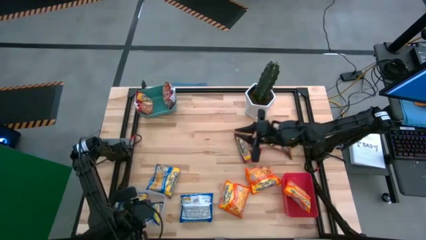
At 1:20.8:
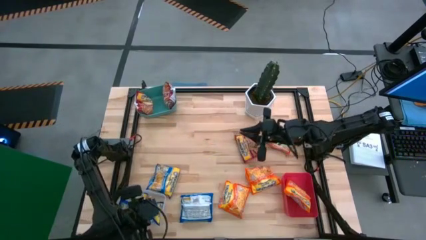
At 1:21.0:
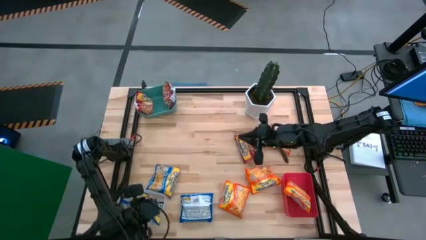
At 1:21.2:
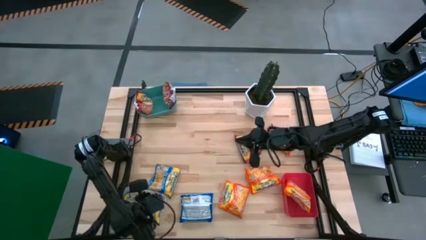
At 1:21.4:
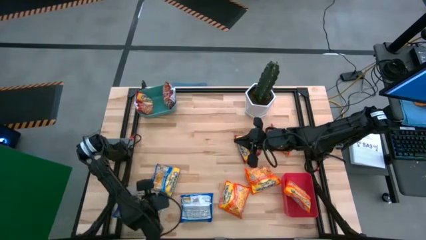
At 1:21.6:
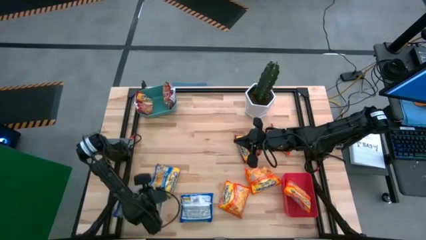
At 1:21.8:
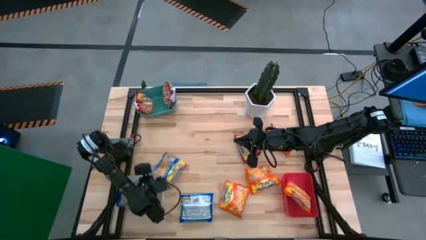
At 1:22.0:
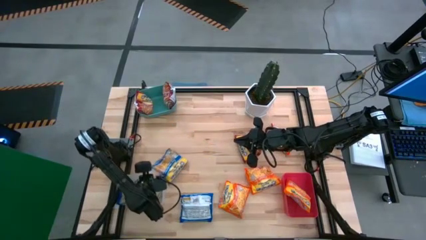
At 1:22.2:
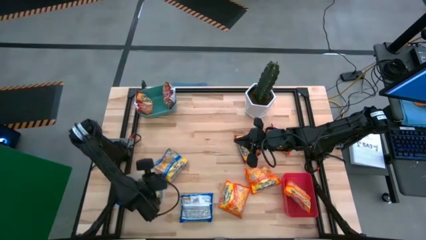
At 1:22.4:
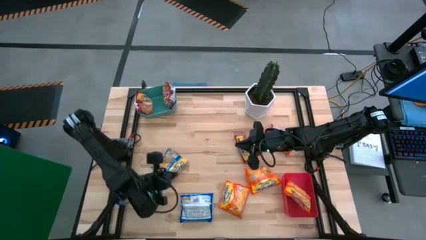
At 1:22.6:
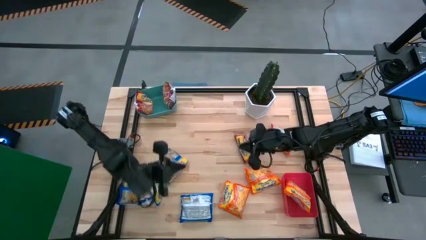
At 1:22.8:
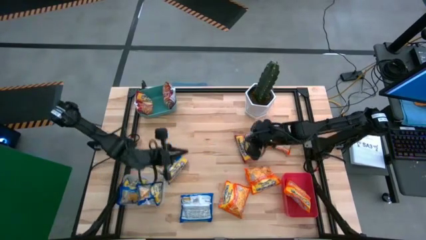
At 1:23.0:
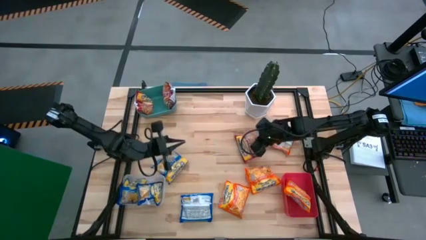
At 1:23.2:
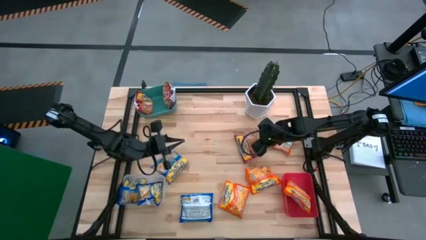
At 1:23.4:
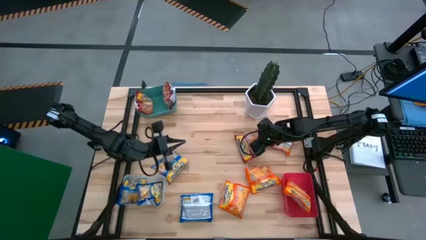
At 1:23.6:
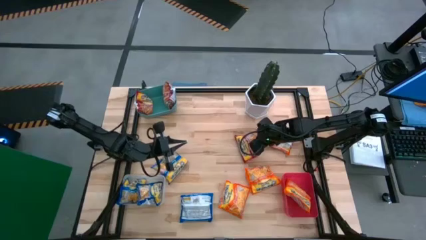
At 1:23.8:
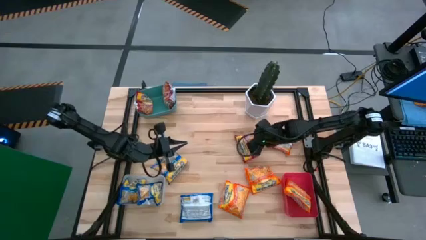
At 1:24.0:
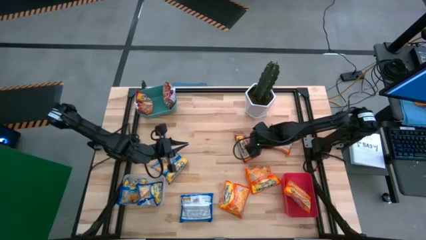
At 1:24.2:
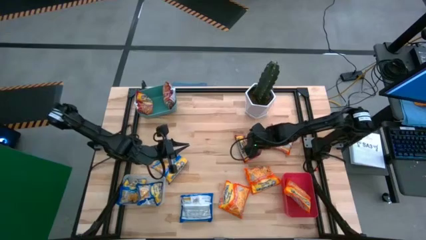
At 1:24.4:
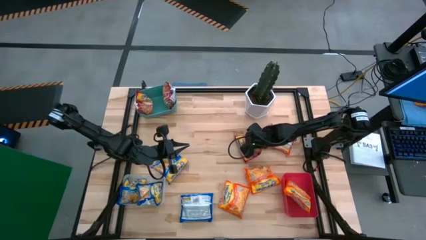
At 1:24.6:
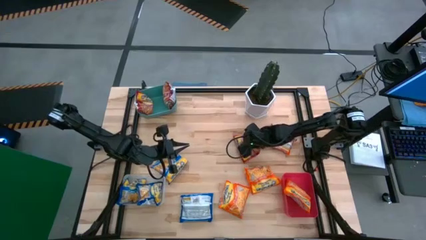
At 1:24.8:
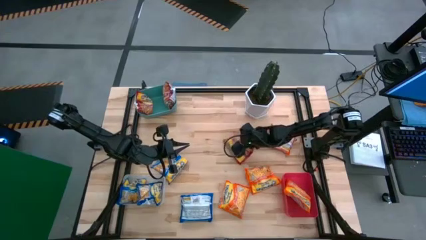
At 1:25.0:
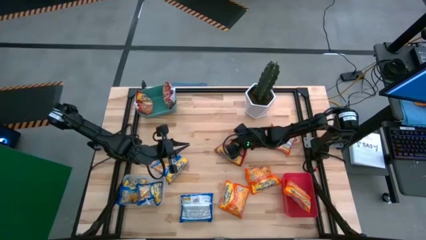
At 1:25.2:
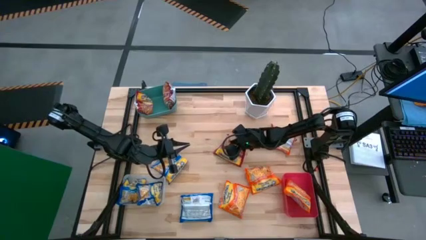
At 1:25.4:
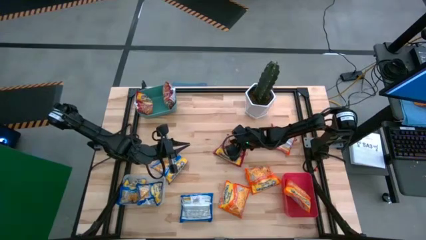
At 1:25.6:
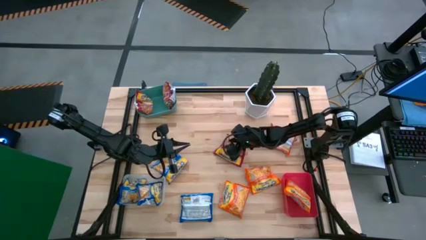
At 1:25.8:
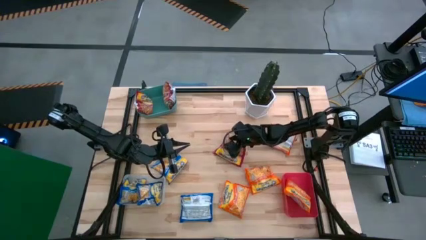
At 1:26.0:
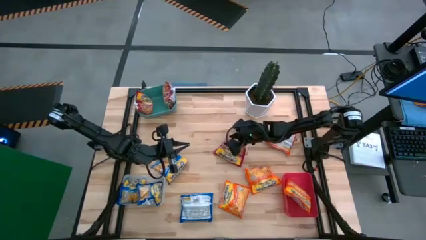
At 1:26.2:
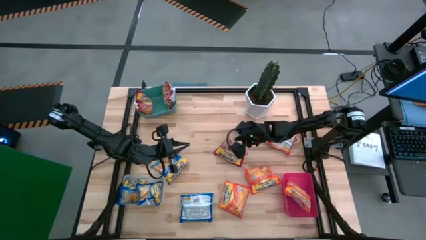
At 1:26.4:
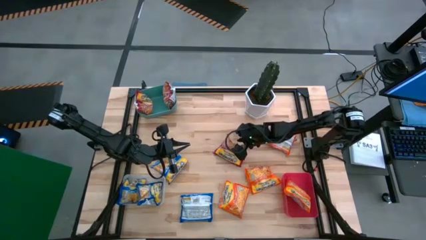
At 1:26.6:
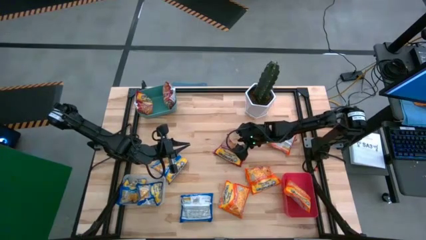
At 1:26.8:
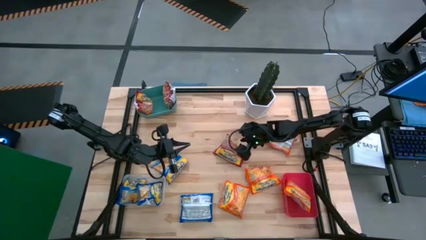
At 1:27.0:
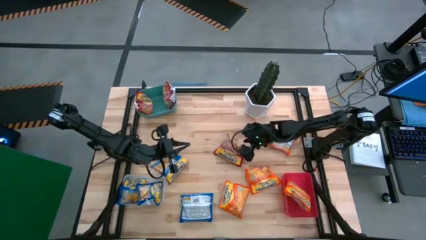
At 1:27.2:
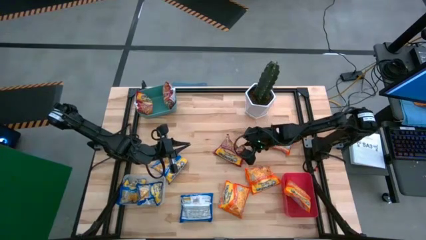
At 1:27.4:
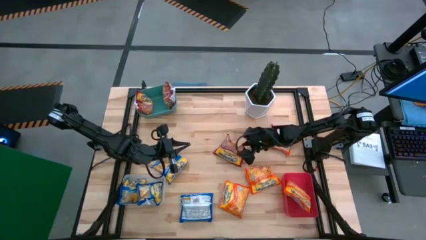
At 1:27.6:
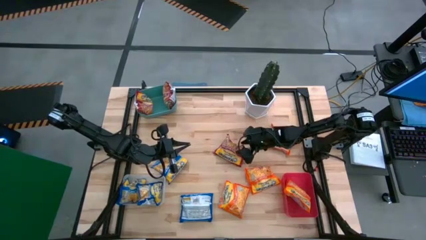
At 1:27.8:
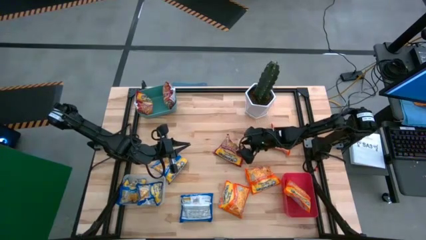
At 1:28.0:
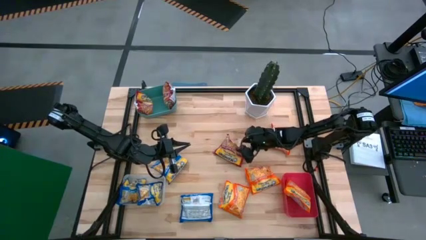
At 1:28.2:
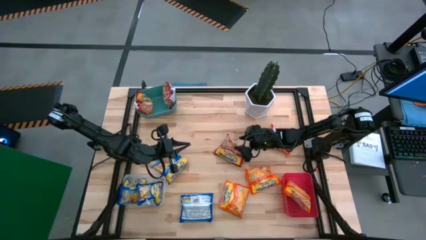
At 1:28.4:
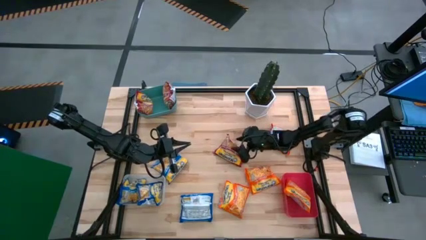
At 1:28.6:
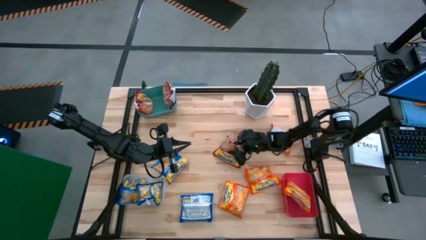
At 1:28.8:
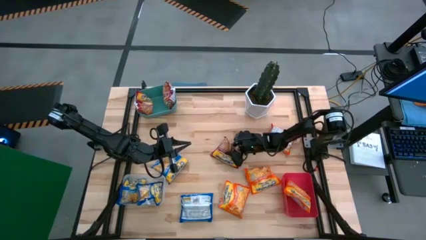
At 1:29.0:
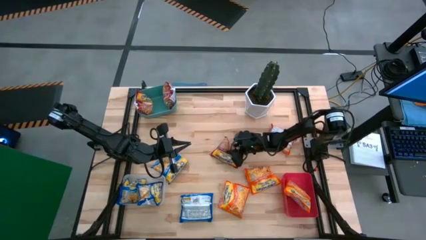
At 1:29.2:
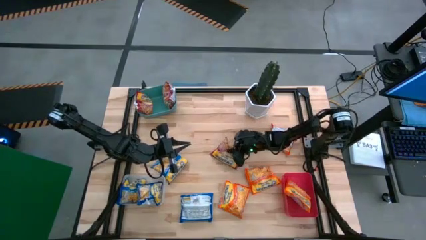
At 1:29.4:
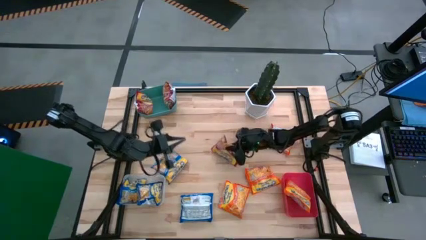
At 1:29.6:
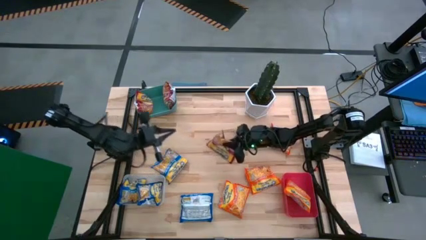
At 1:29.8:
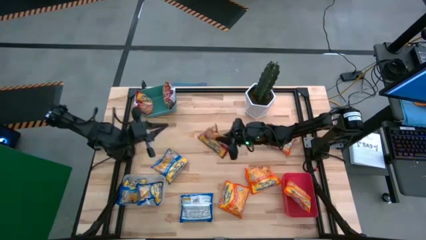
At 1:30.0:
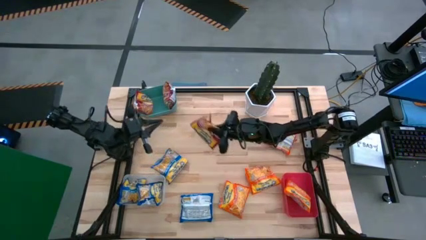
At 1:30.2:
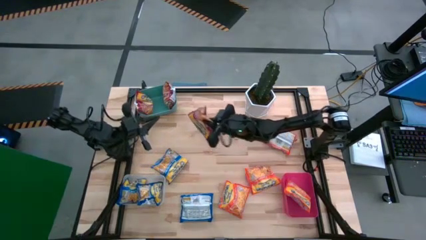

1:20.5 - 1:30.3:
Task: Sort Maruchan noodles
Put the red noodle into the green bin

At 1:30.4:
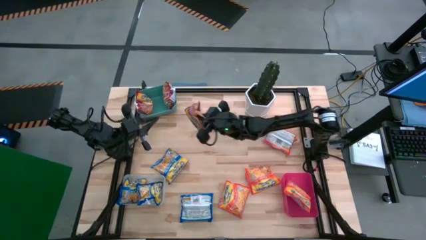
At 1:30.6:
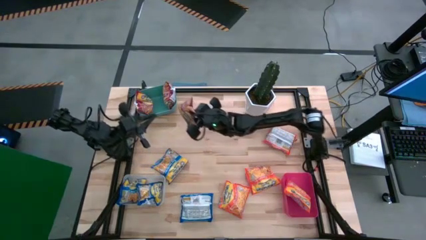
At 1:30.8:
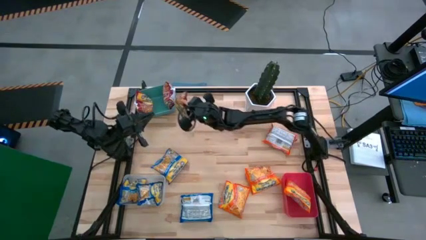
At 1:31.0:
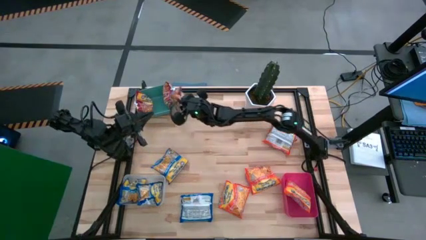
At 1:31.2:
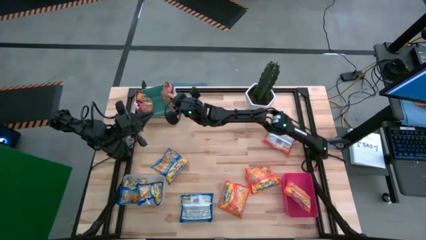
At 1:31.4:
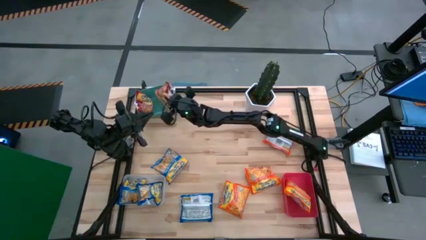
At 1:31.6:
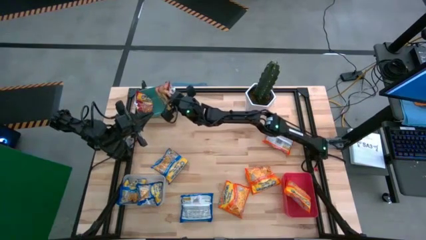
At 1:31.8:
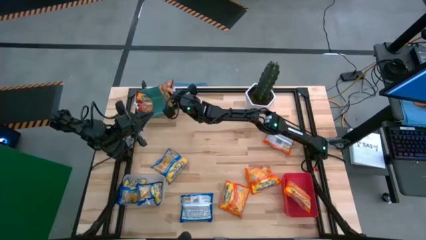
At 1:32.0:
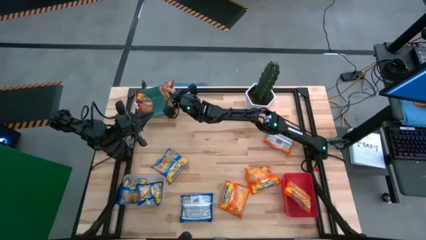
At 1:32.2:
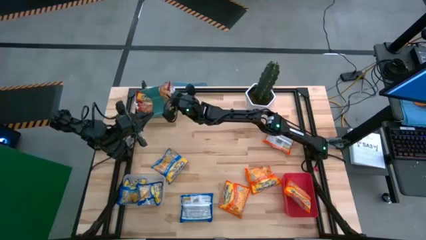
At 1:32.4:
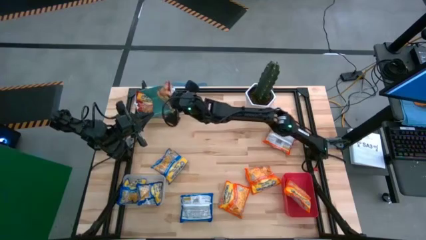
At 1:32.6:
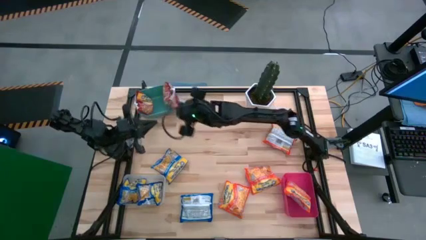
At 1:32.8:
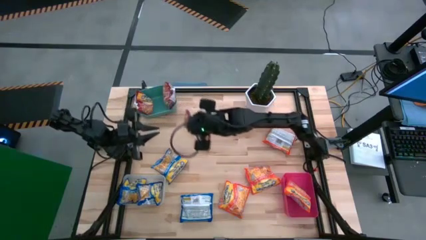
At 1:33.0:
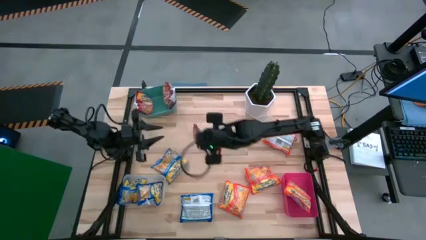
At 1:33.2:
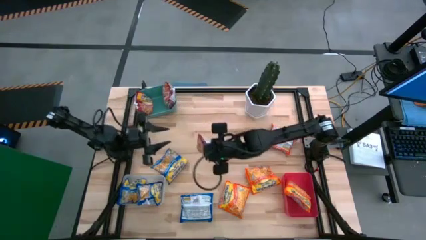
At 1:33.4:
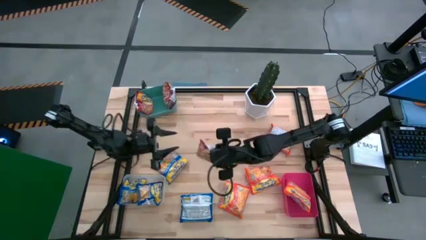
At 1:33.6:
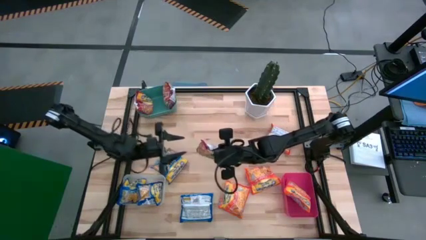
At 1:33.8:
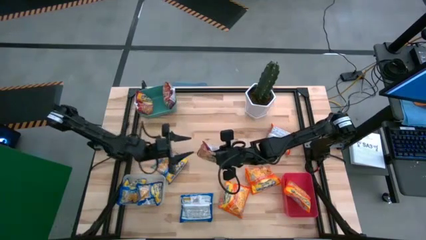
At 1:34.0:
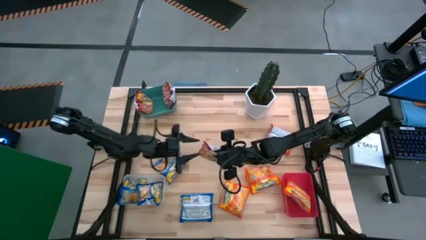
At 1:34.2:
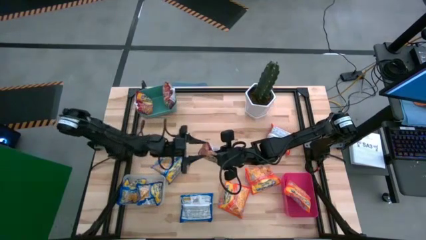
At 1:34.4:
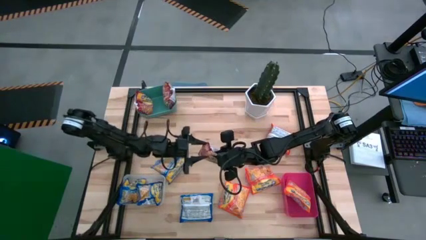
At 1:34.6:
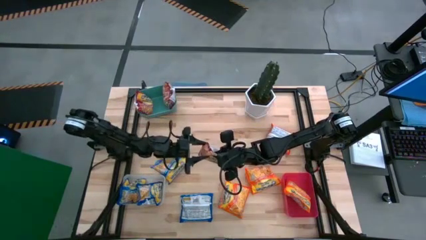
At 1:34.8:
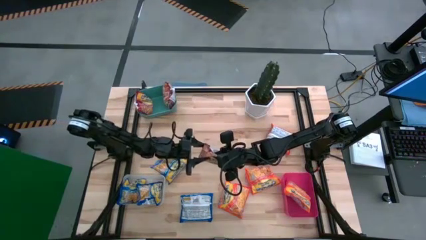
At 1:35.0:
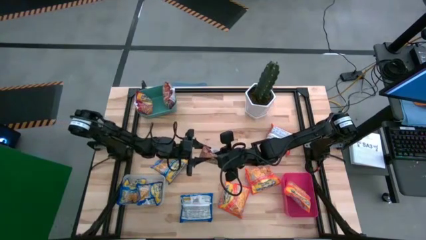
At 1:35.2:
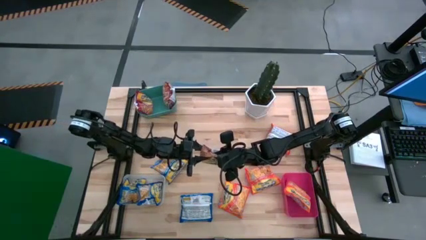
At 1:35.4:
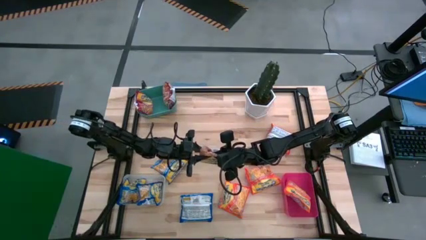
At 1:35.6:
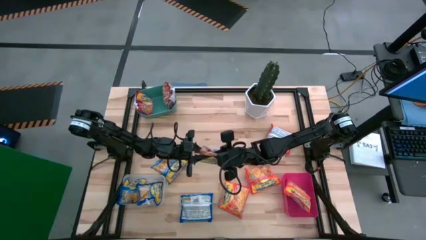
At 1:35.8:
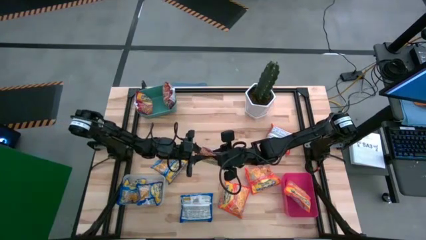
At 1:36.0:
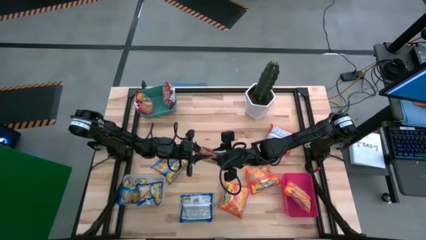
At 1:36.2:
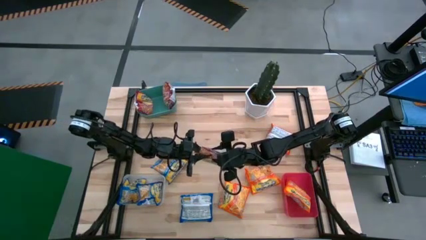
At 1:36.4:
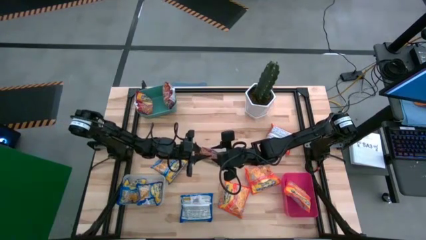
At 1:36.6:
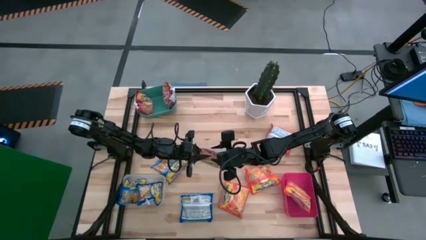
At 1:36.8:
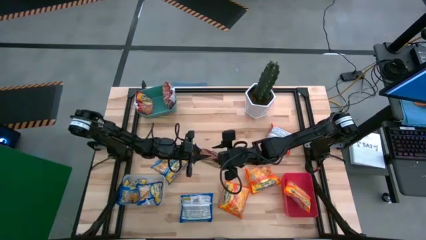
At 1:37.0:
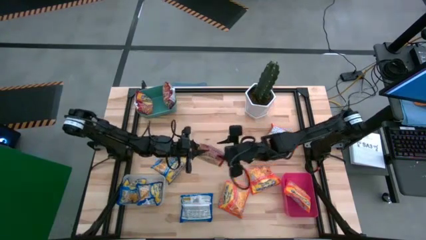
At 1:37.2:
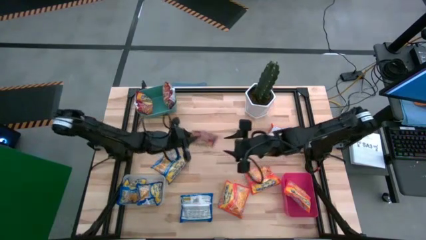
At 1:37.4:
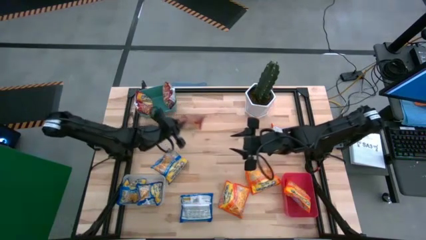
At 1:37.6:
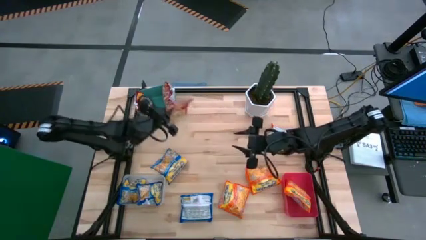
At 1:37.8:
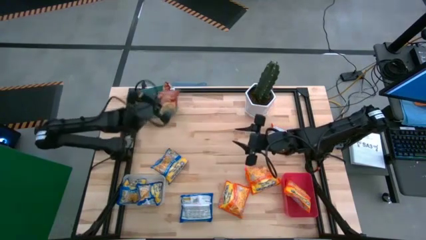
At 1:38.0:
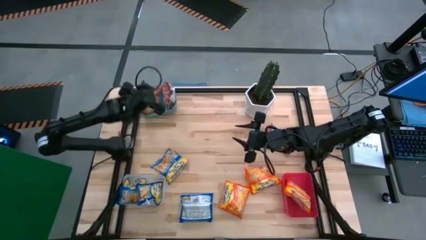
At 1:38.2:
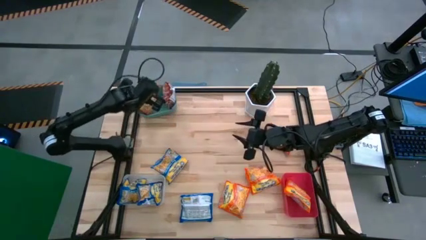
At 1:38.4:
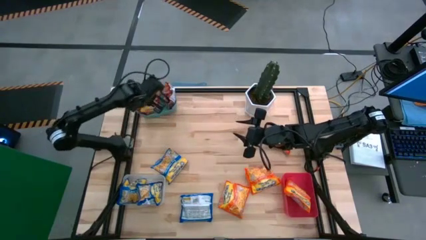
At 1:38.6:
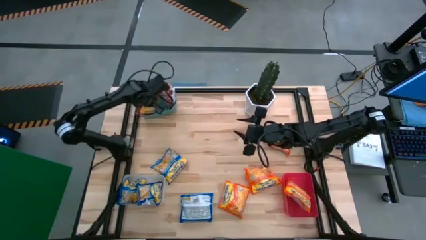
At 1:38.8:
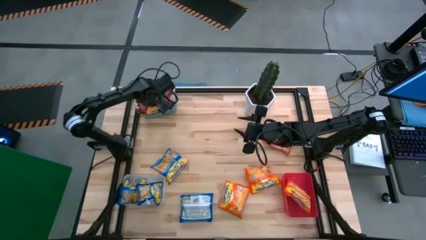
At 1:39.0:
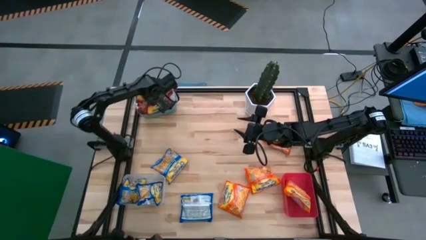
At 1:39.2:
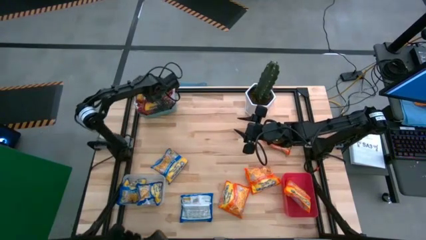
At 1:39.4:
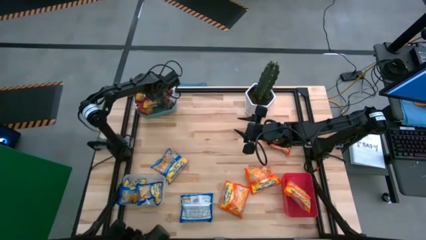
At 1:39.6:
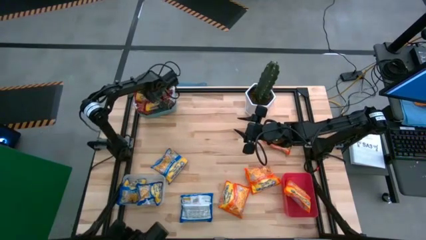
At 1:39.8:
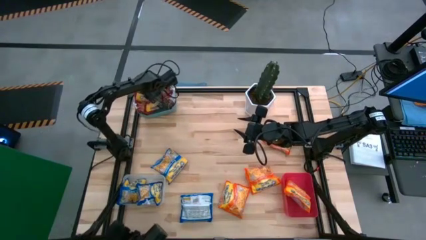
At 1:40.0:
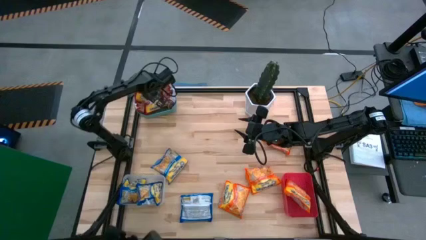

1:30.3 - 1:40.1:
Put the red noodle into the green bin
